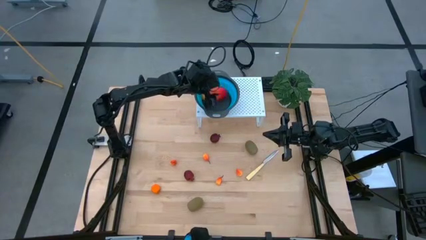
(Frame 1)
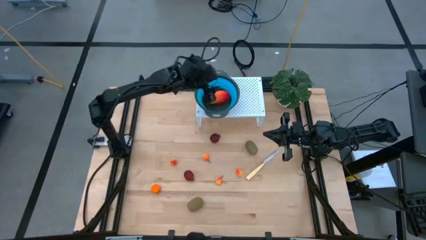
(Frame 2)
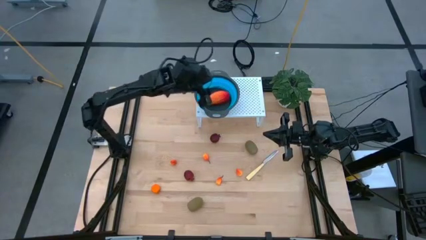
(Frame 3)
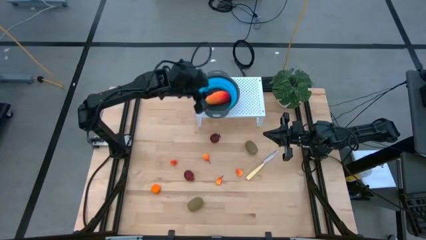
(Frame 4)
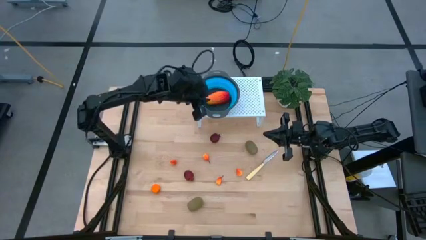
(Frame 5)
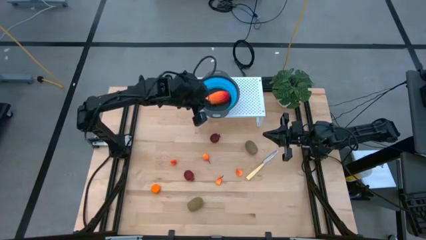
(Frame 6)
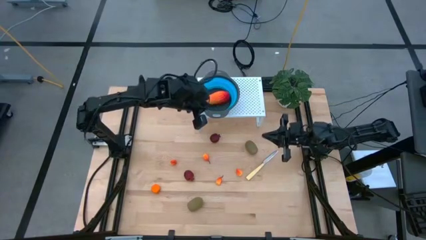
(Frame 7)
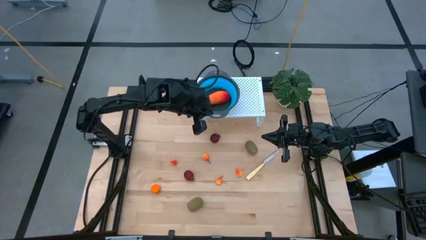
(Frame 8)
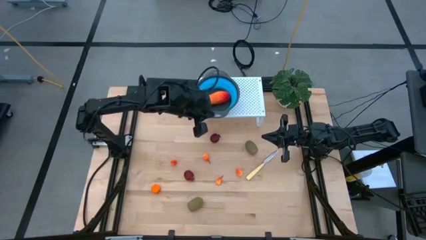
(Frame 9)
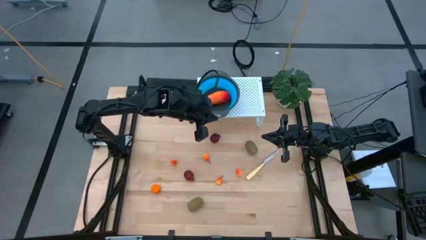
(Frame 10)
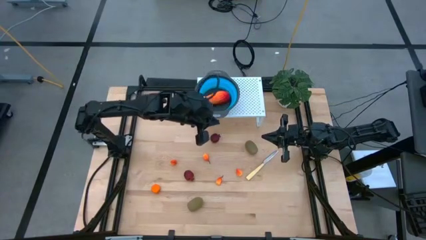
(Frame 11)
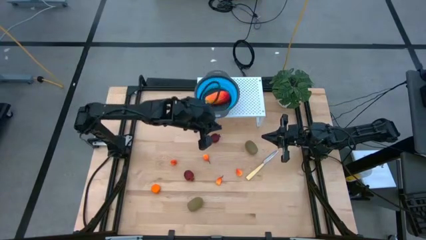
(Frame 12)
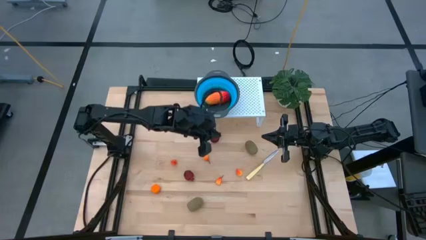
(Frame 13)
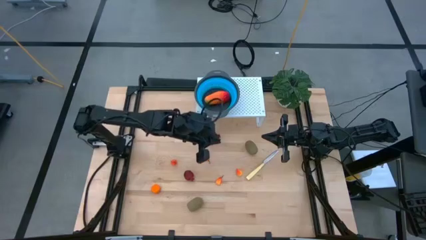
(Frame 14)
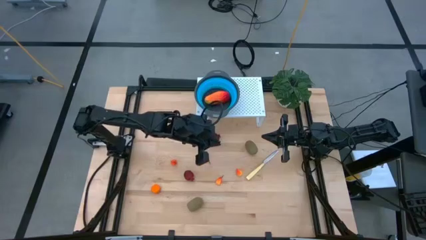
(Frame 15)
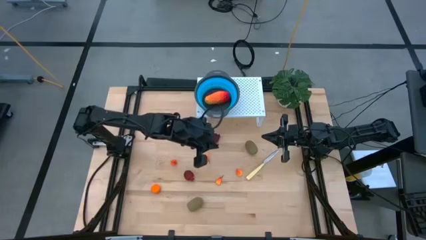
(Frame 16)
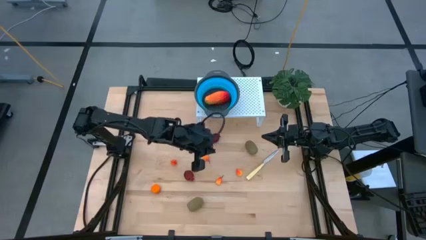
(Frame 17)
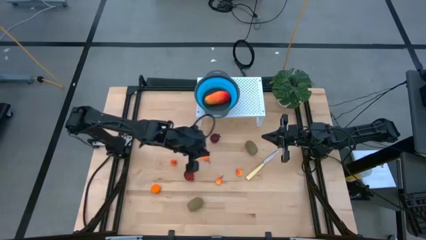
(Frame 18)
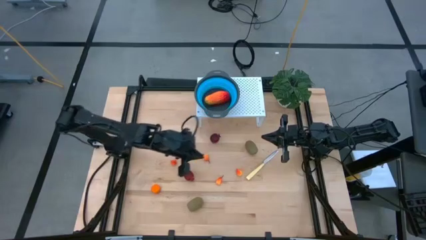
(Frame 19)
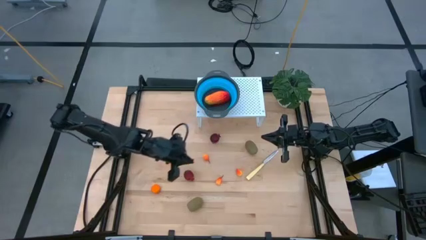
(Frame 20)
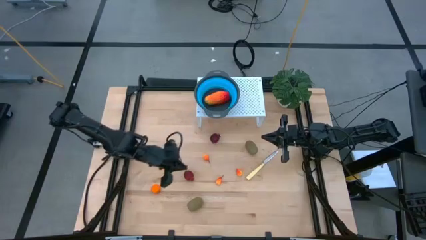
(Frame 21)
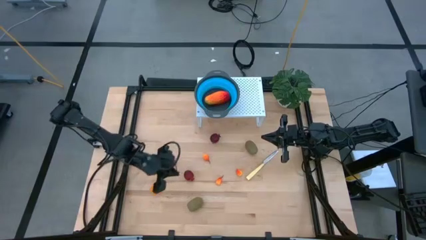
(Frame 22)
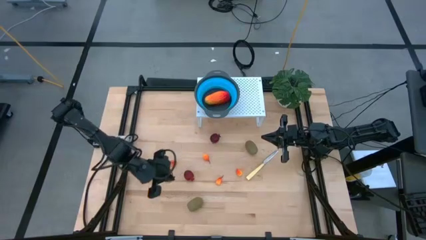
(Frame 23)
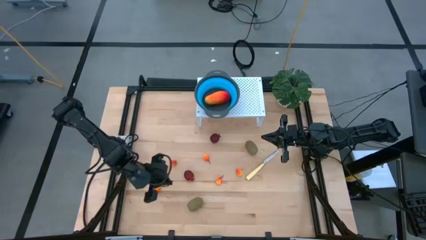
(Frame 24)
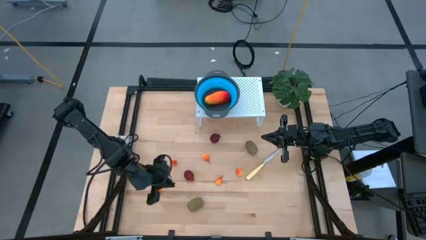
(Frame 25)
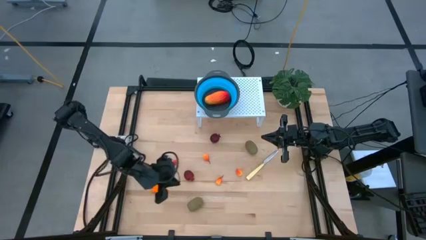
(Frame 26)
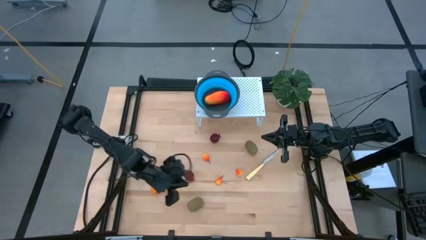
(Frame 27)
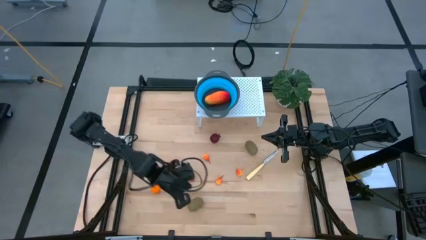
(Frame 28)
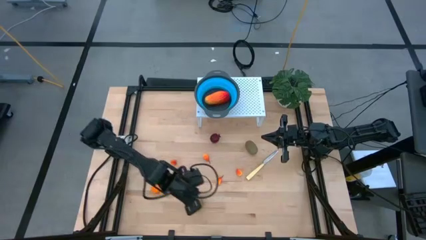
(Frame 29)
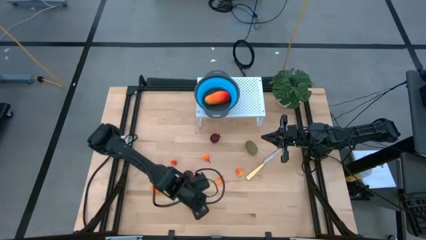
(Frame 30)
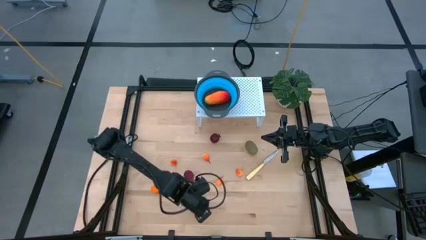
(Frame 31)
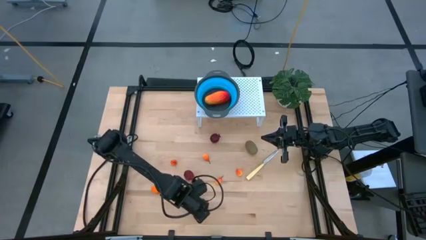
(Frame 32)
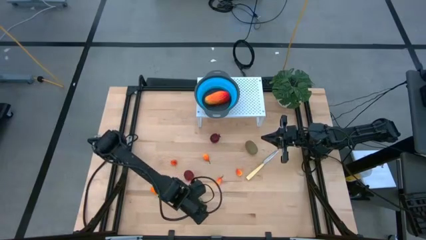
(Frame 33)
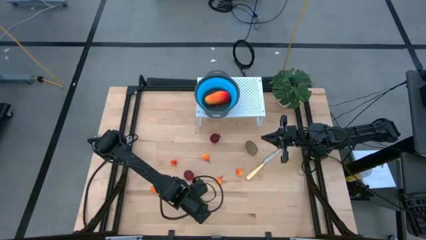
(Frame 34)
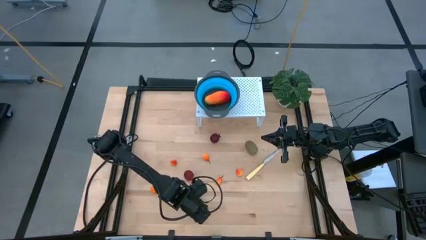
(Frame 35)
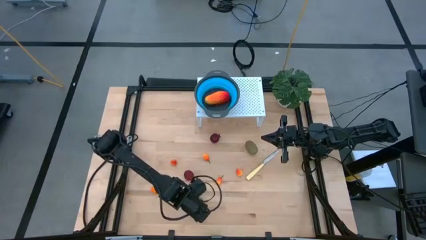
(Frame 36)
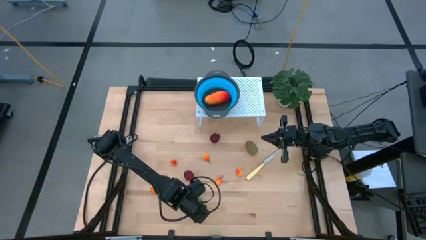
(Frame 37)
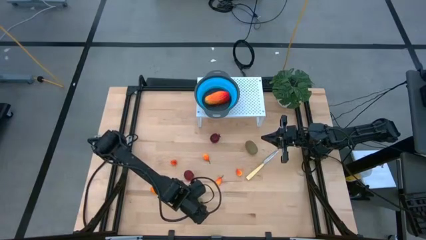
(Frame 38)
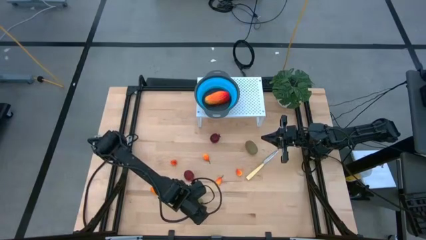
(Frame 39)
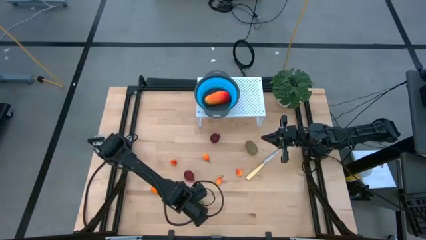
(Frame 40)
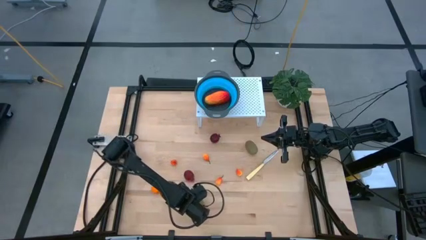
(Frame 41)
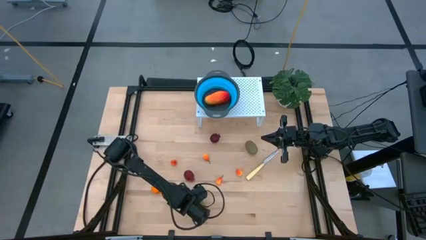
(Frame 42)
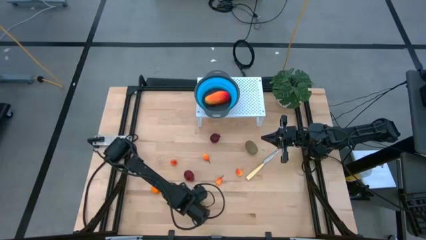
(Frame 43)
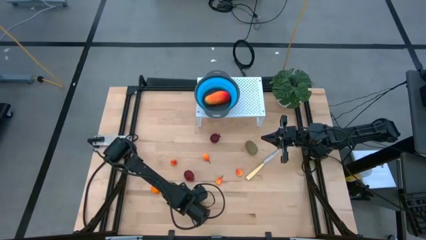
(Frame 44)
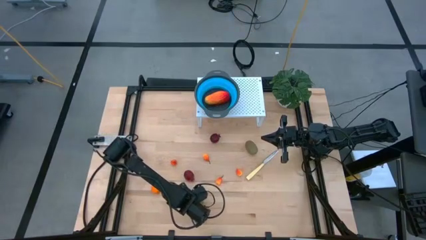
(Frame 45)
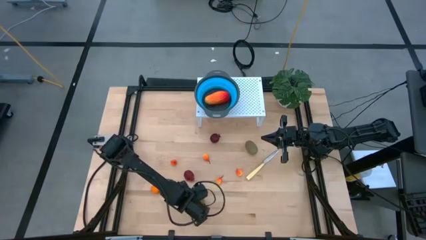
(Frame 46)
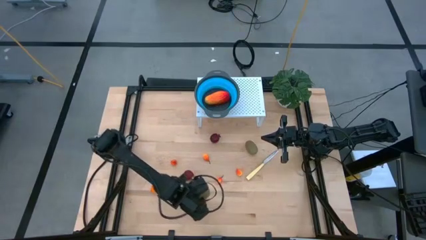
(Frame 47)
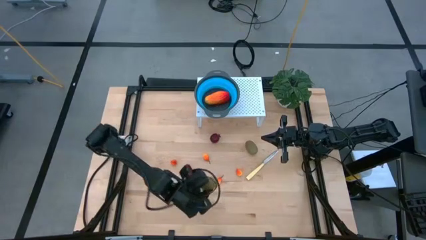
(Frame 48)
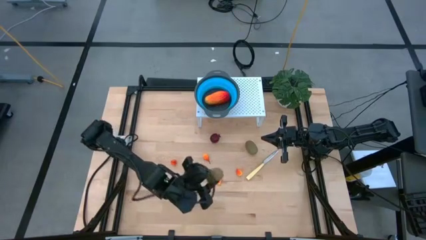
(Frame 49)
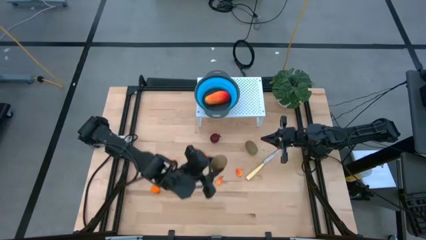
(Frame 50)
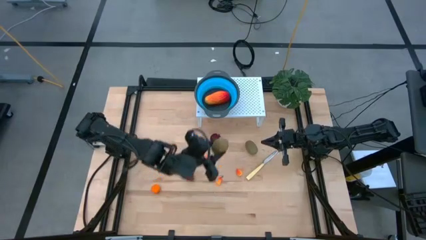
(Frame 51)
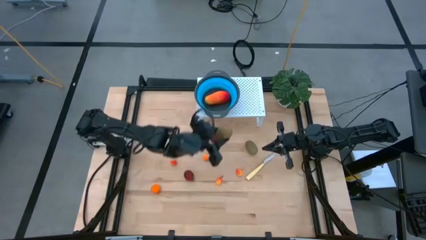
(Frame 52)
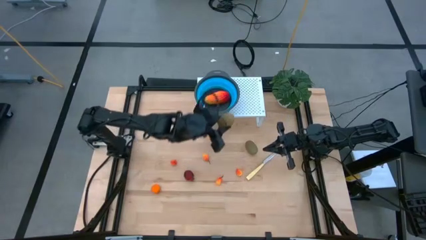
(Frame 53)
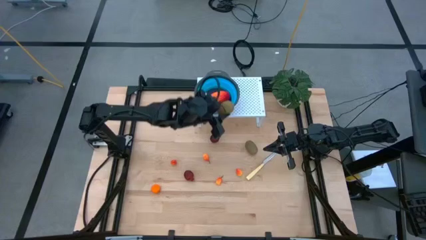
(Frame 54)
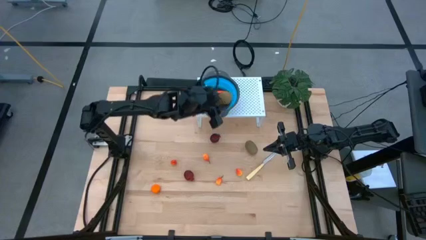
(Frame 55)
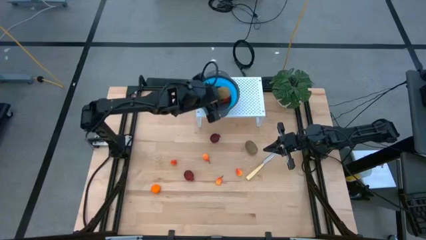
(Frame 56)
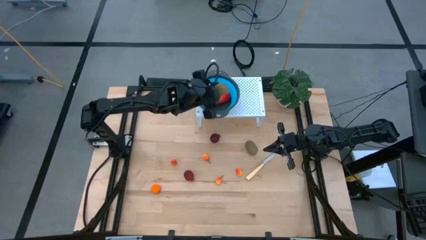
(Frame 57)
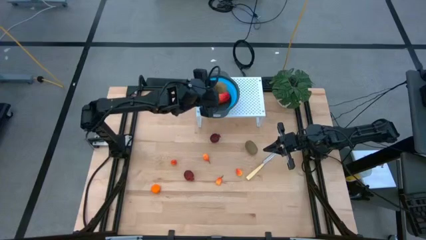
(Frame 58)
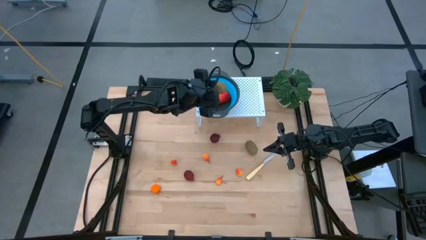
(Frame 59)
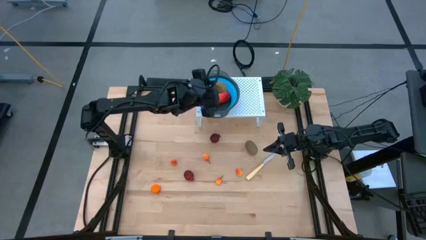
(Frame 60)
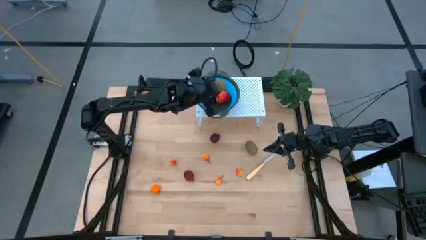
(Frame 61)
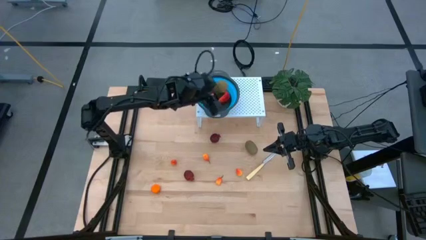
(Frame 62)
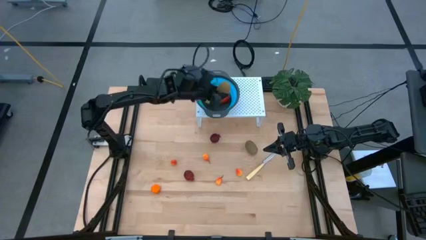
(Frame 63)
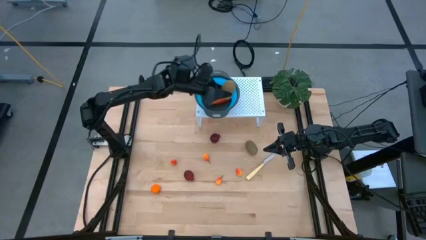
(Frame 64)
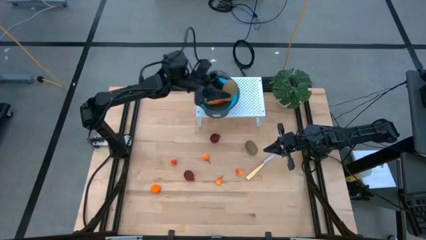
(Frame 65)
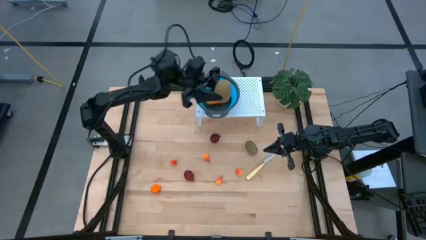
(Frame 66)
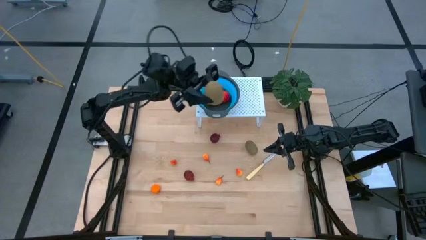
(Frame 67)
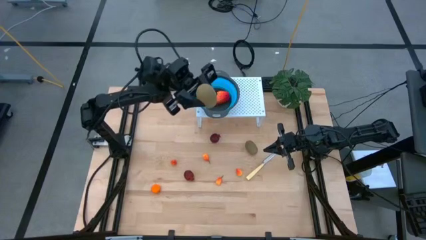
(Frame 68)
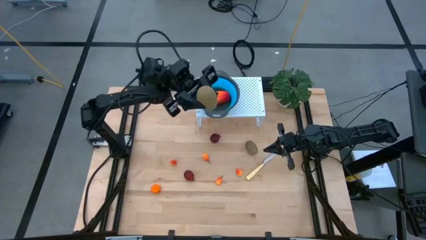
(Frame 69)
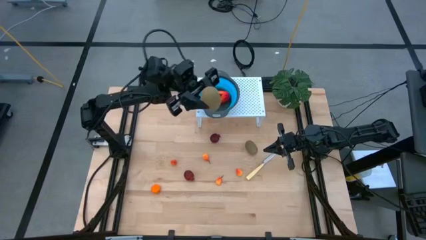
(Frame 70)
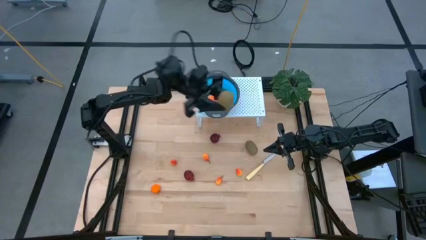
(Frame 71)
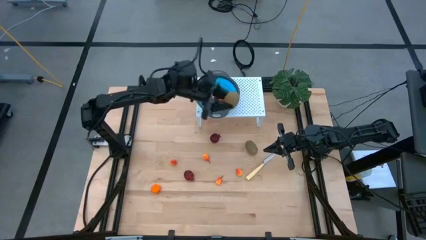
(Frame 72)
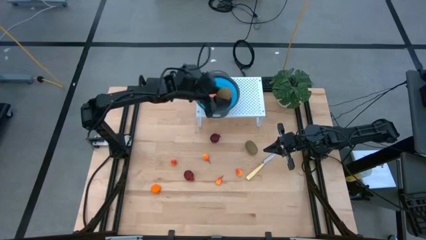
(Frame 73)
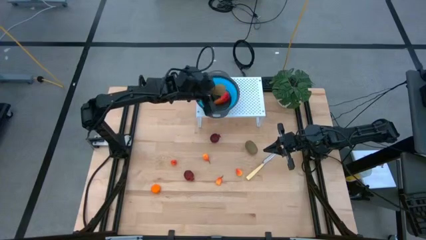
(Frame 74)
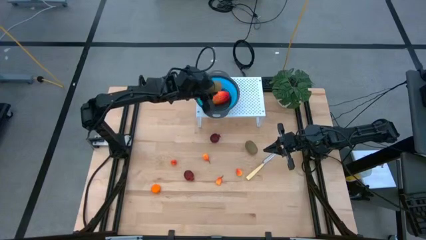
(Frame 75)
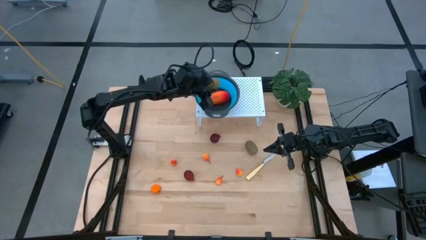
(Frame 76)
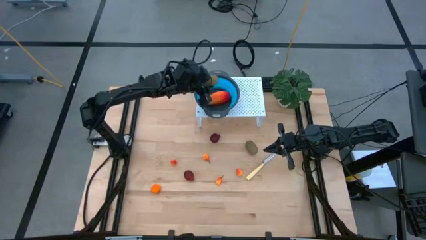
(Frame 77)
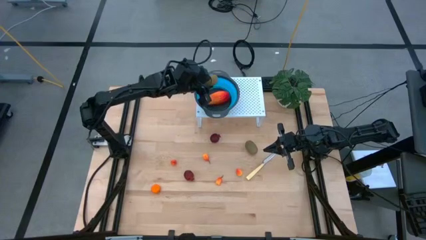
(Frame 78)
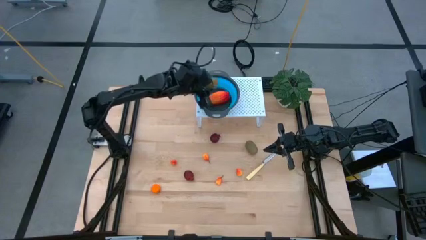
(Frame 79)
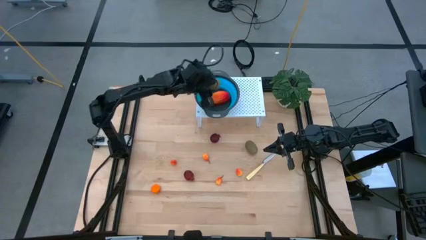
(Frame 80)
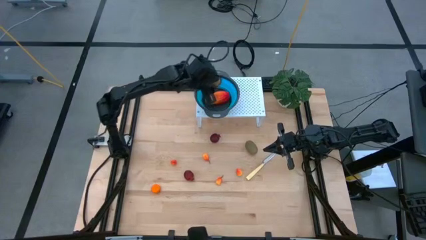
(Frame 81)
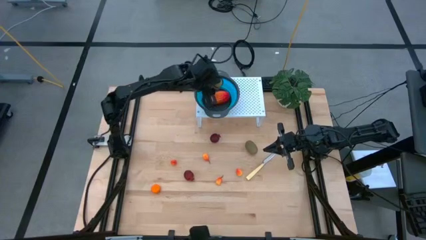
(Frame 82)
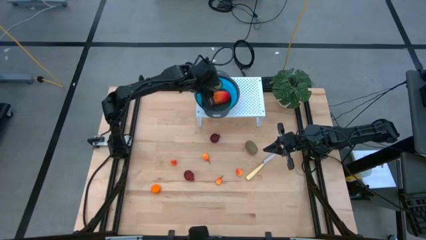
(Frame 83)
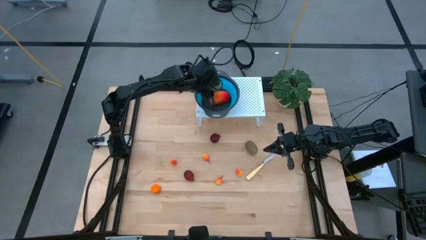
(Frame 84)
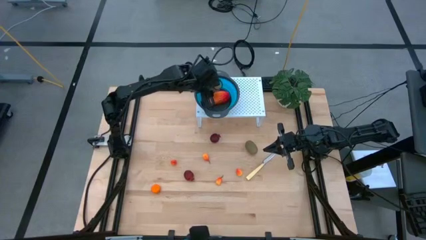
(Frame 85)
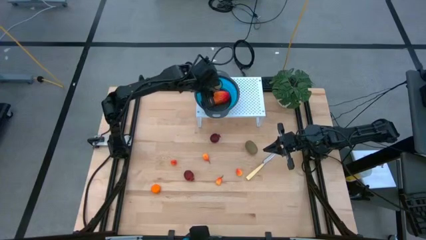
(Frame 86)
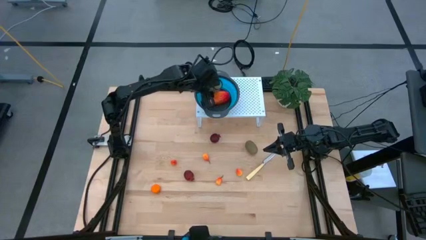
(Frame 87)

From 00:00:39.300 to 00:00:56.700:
Task: Pick & Place Fruit
Put the bottom kiwi into the blue strainer bowl on the shelf
